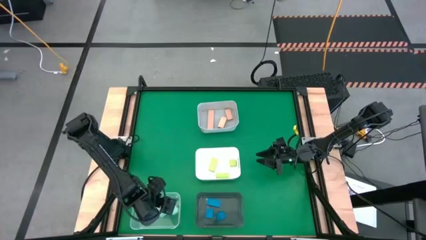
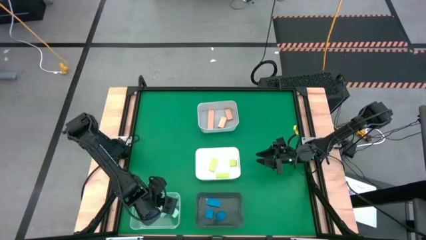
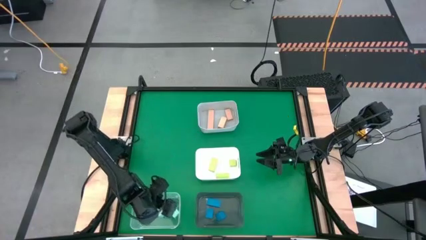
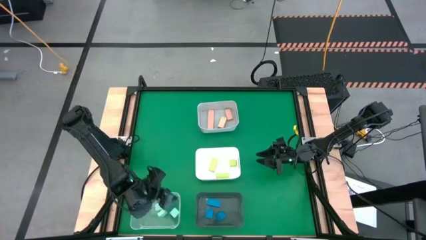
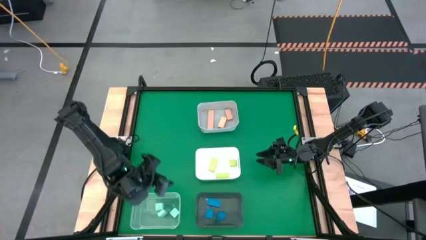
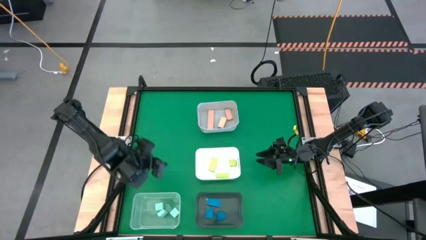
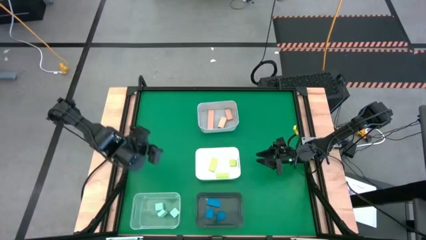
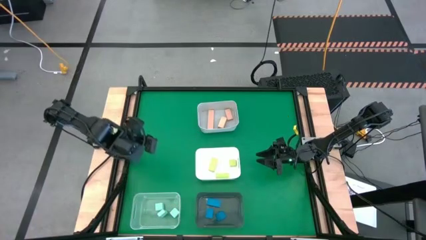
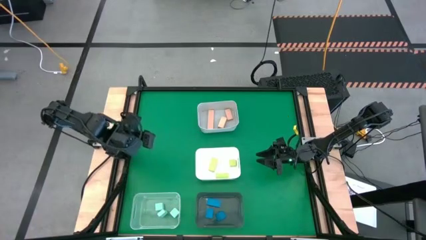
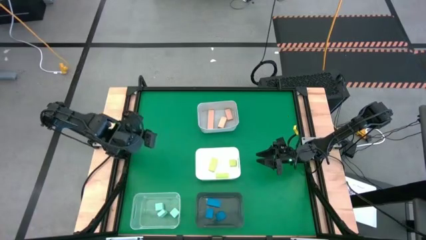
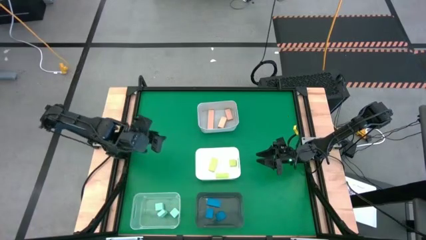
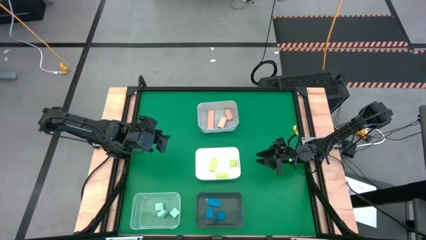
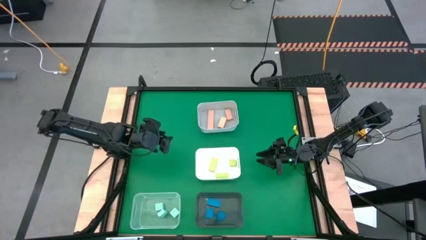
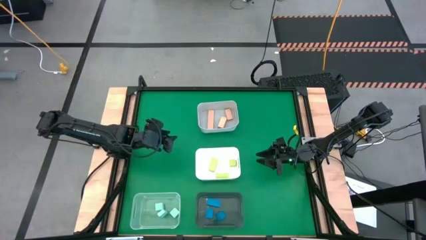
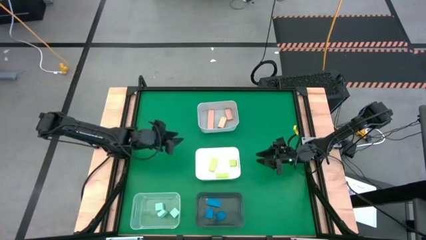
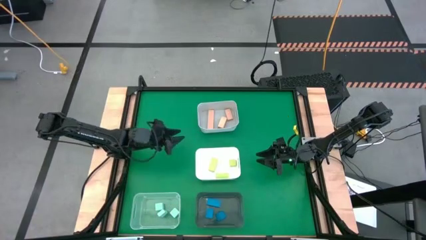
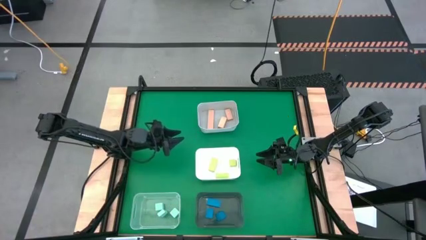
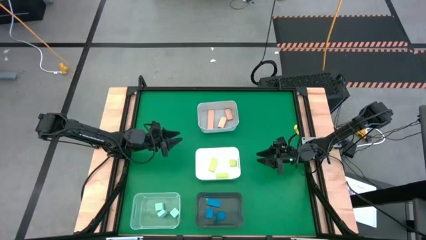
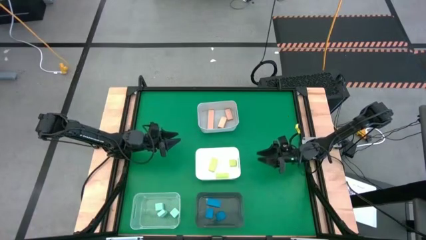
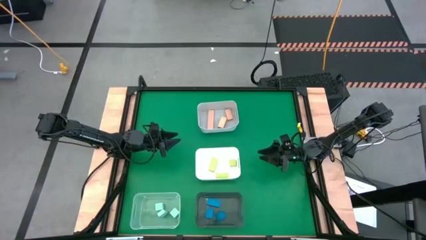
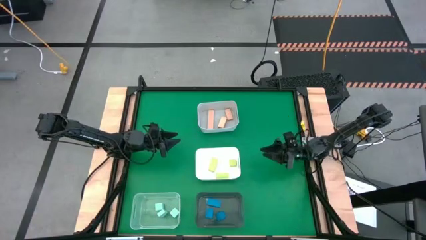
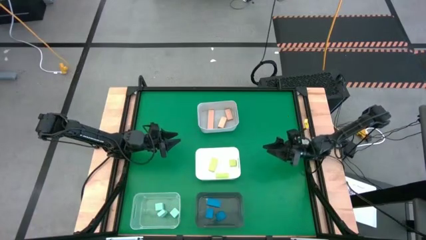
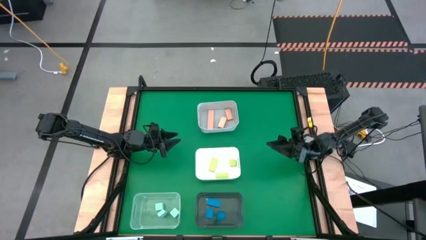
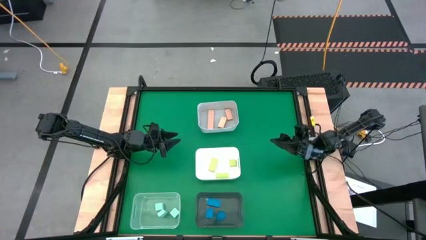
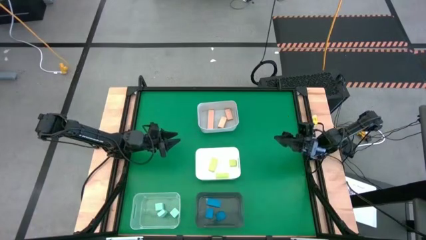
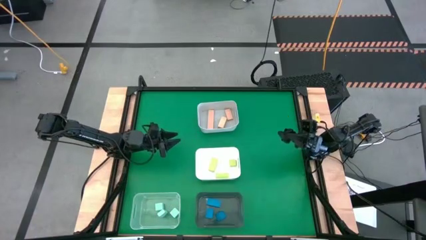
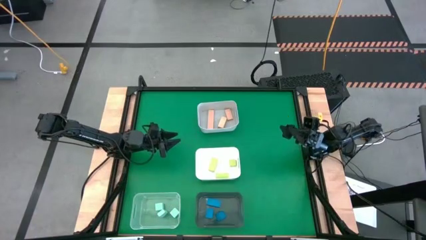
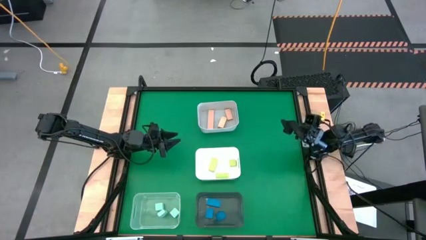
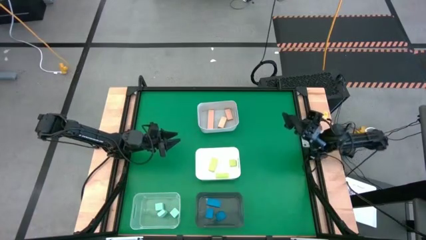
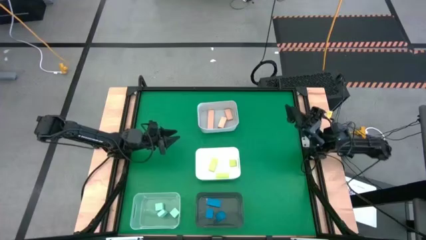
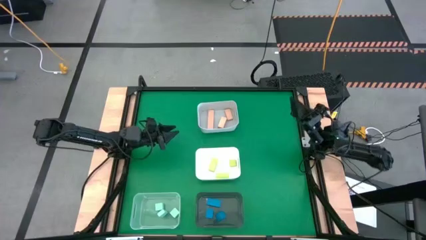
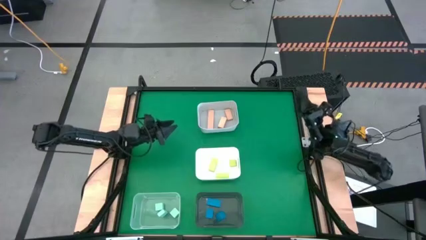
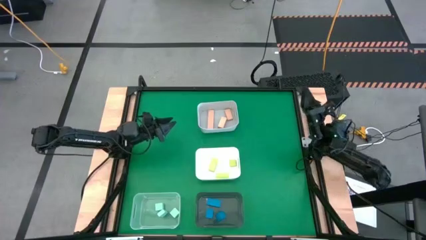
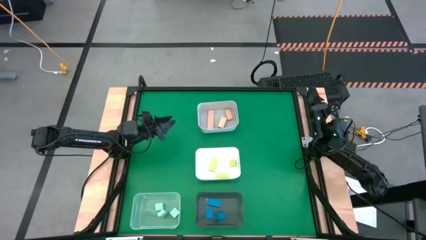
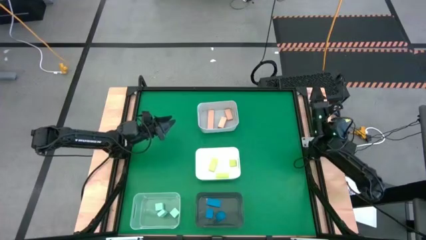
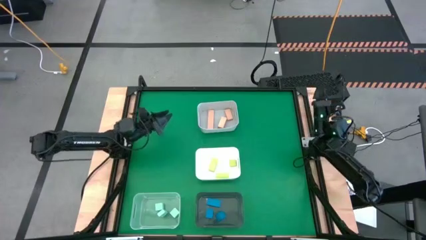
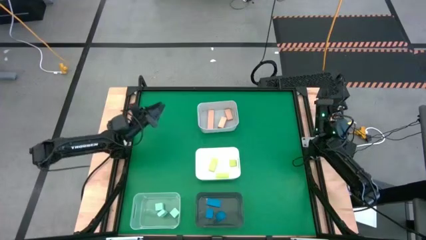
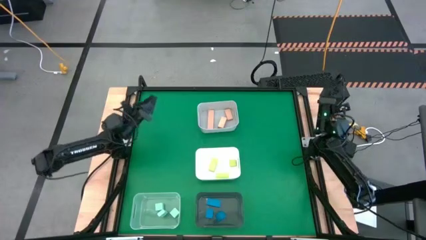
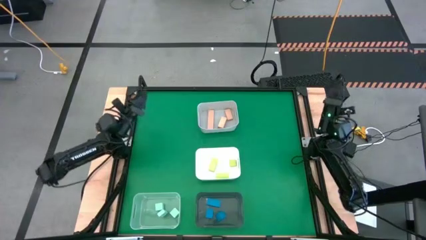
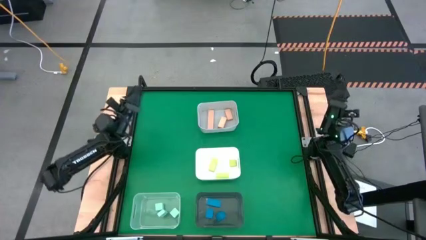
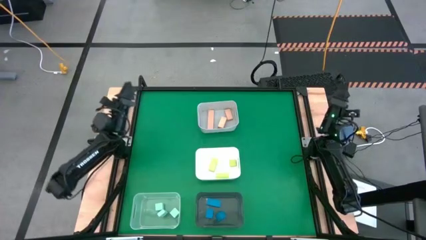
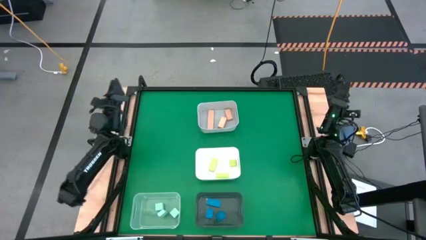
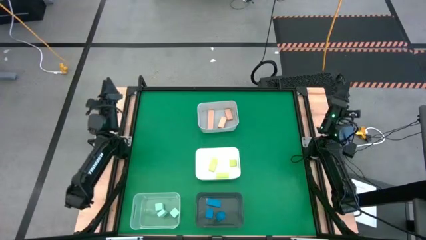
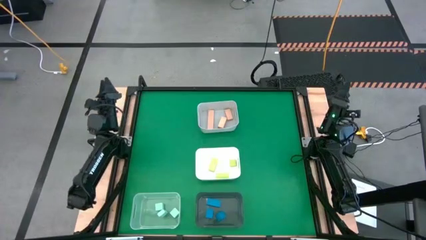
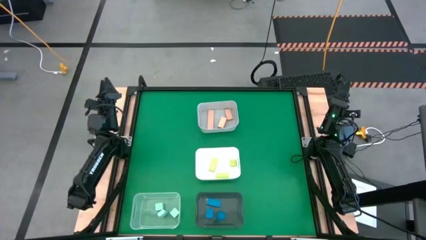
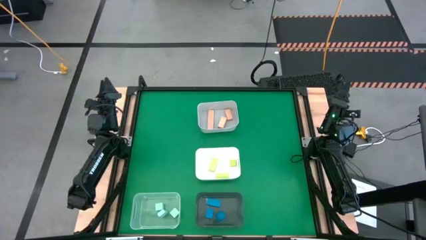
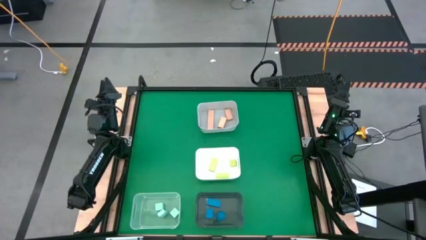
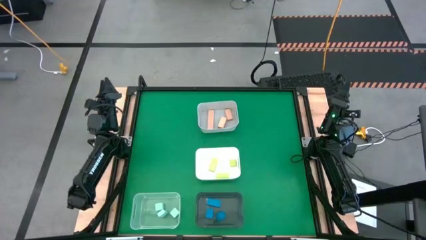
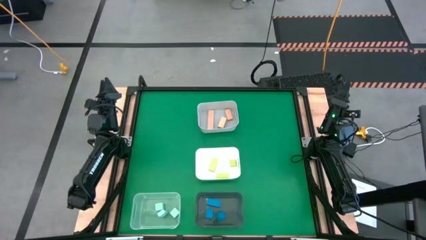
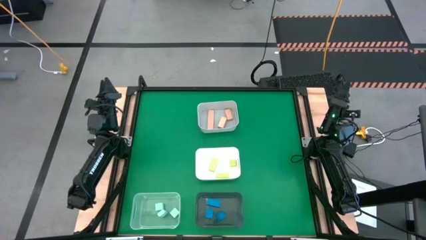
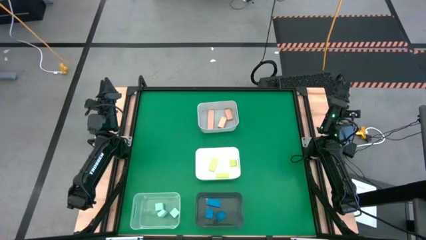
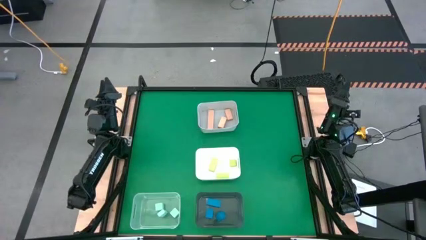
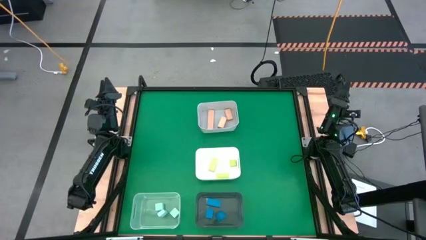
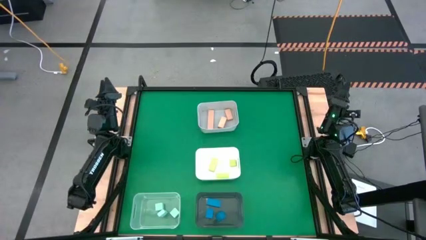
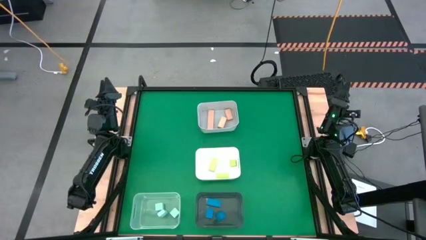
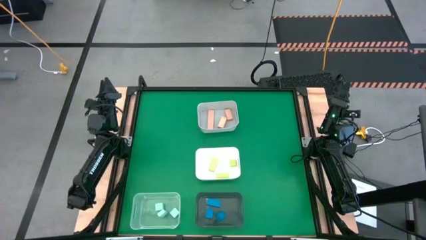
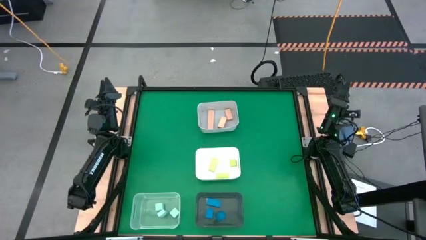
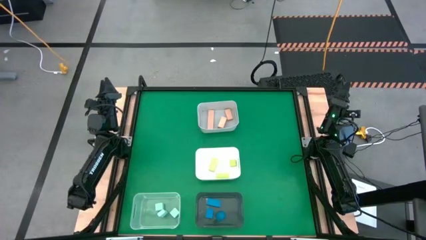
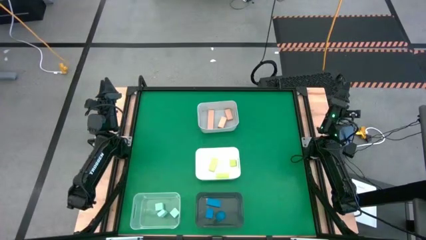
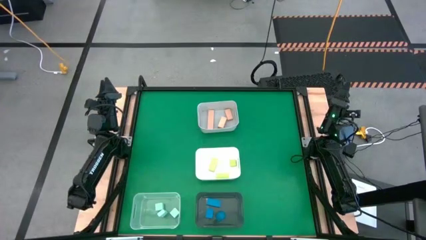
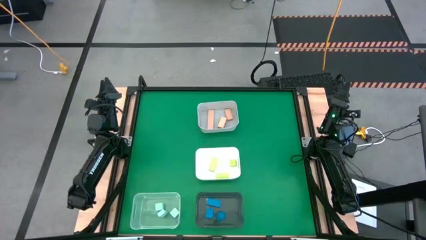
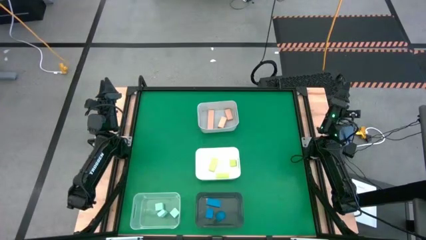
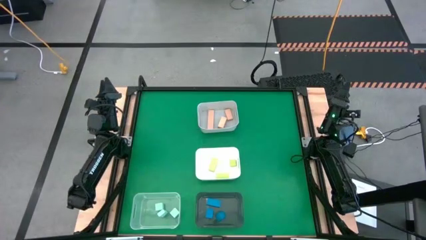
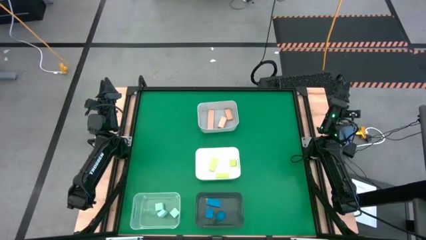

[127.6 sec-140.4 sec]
Task: Sort & place blocks by color
Return to Home Position
